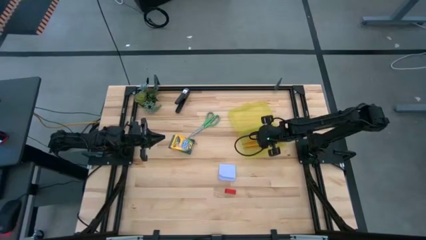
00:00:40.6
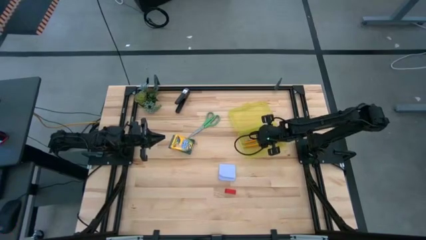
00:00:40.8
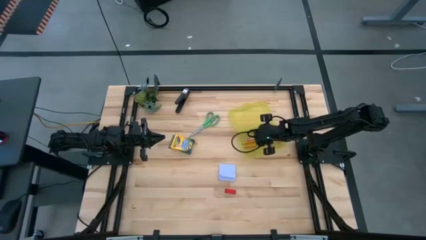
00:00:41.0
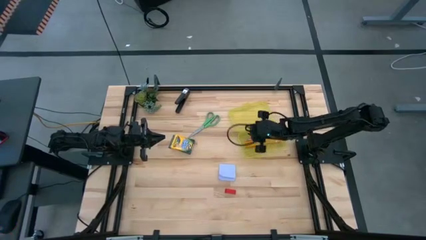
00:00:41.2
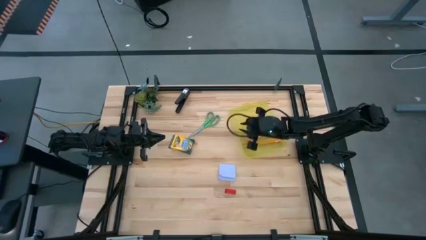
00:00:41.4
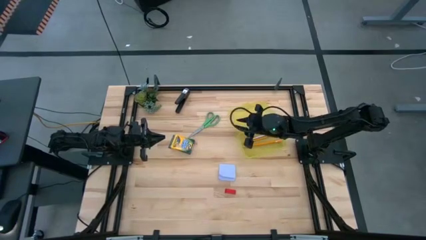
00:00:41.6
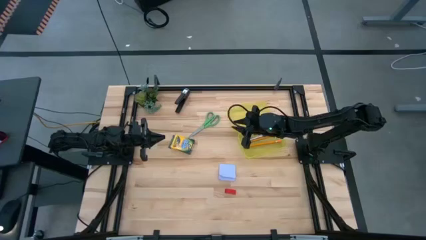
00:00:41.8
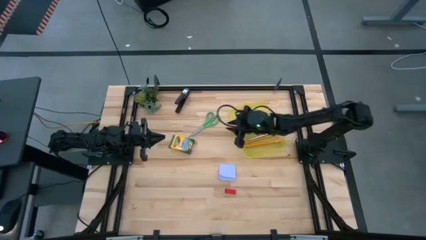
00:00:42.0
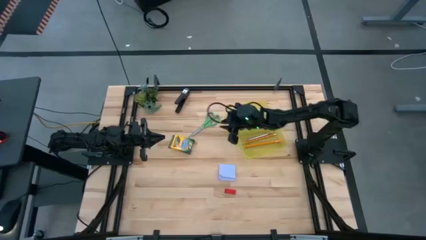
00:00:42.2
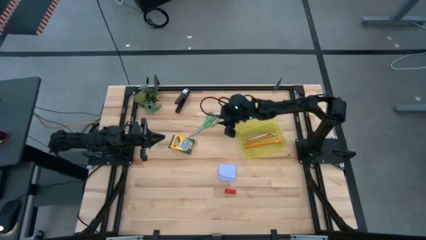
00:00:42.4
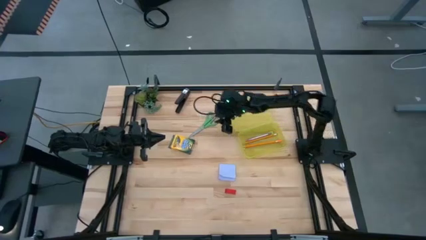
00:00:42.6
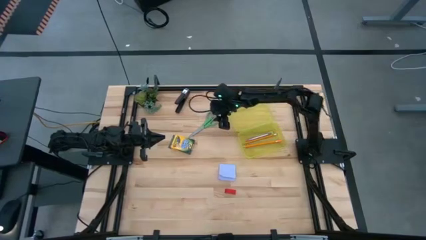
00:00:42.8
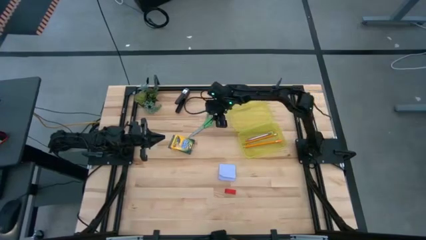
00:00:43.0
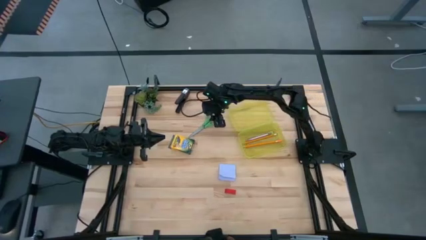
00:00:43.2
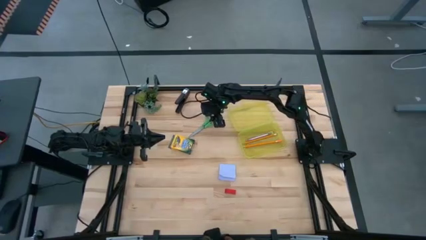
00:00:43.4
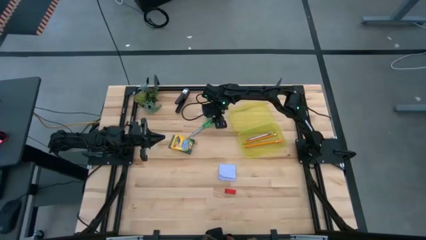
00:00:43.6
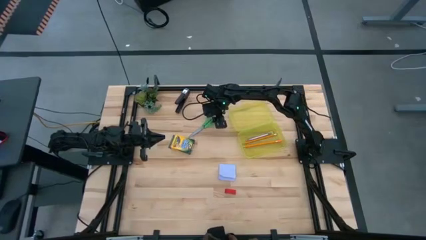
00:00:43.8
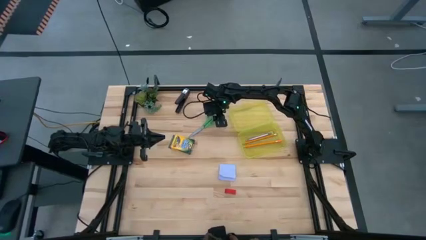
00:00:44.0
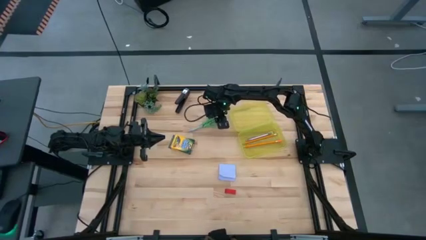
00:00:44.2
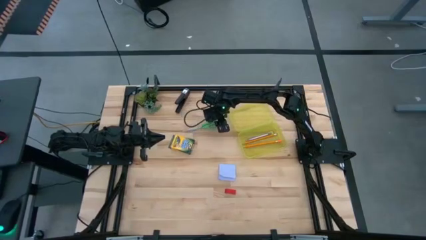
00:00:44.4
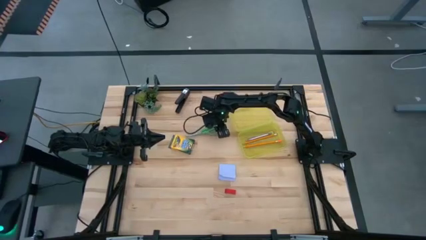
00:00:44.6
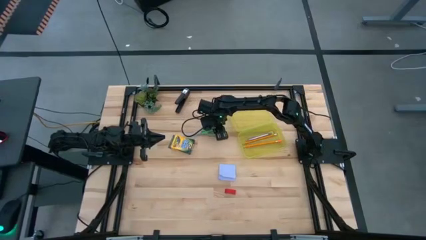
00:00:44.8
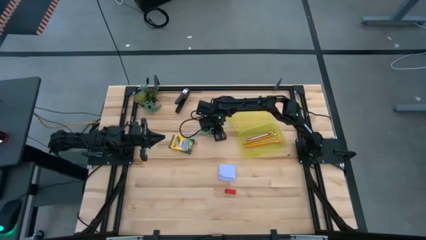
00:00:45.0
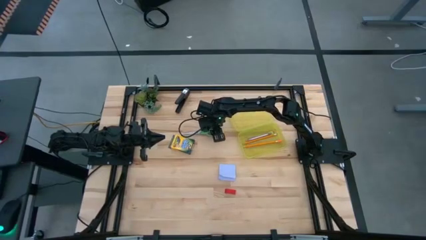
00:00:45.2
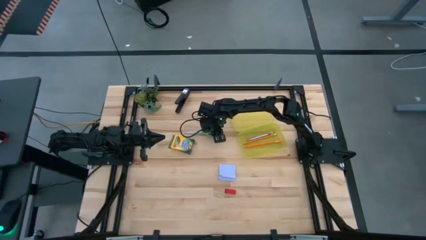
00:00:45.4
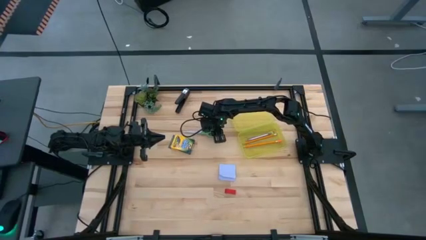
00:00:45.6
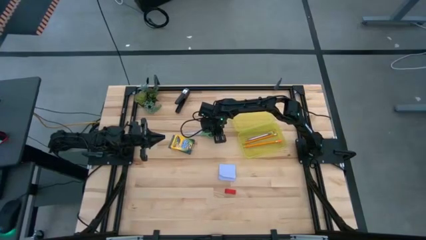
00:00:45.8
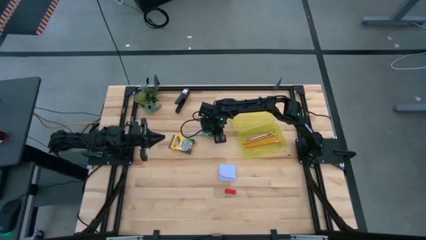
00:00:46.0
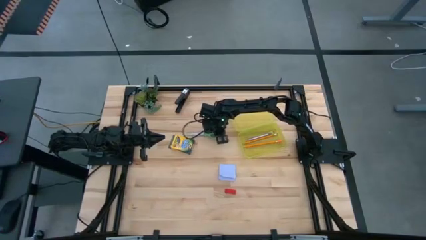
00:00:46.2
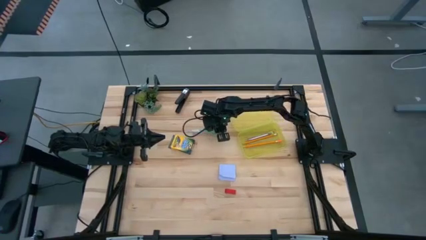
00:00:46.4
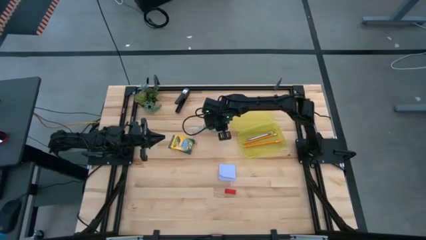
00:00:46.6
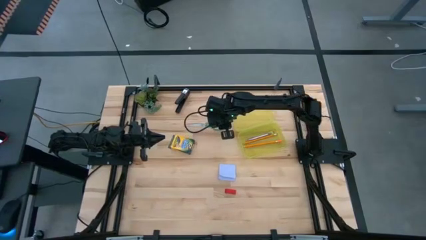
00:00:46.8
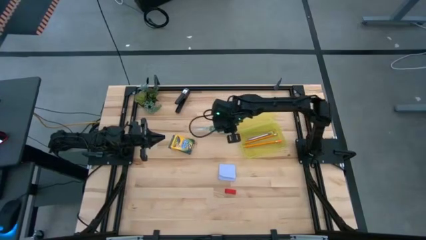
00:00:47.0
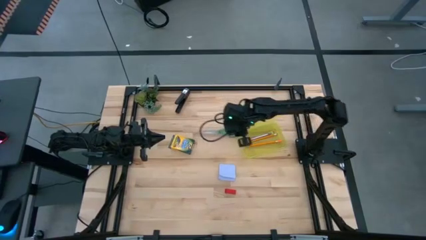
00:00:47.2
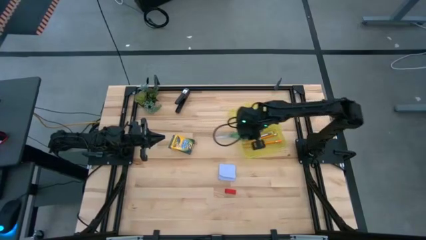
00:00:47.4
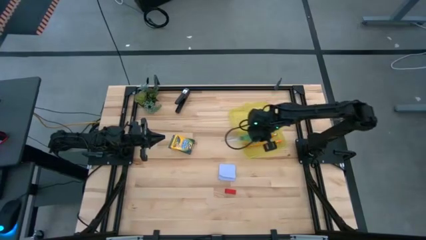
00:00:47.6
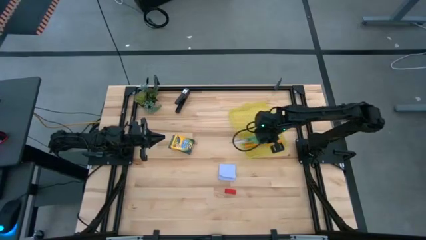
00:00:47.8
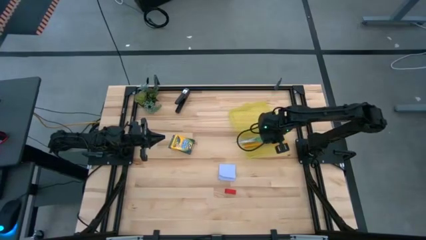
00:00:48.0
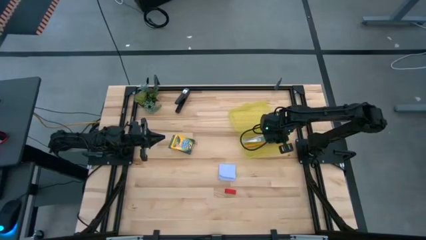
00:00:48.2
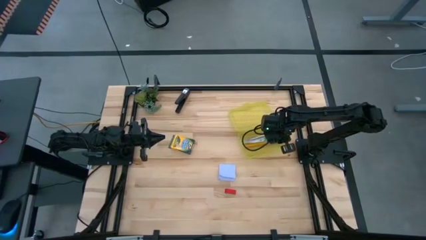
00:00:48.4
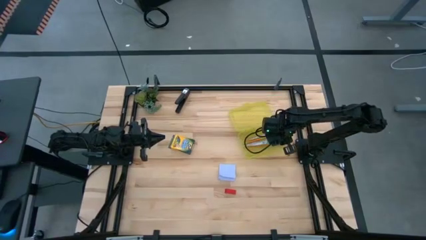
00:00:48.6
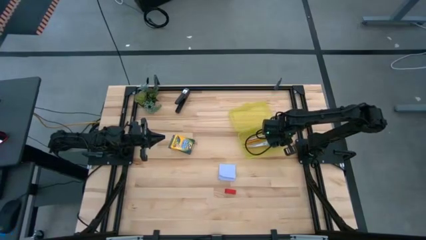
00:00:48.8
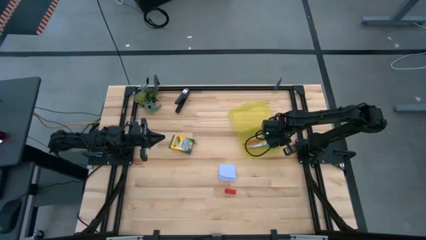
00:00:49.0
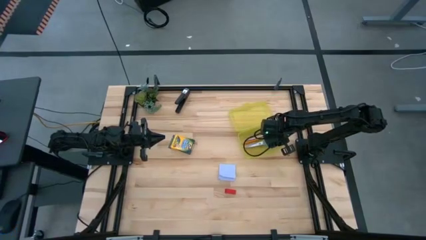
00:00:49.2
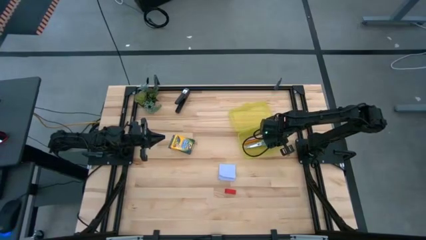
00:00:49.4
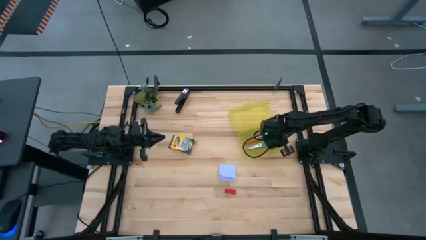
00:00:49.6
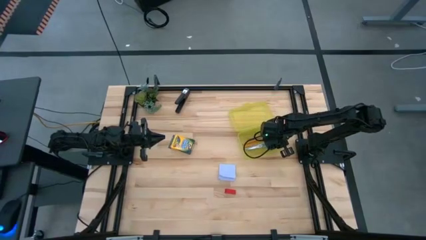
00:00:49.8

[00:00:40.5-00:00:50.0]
Task: Pack school essentials
Put the green scissors into the yellow supply box

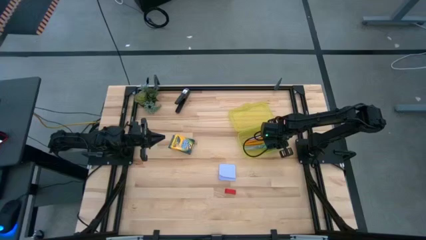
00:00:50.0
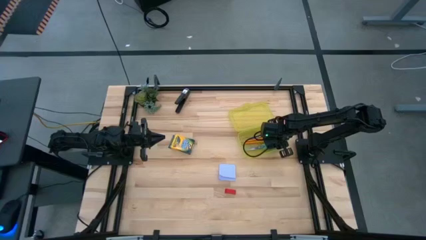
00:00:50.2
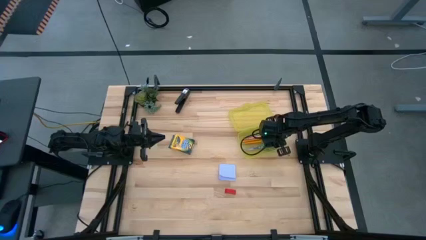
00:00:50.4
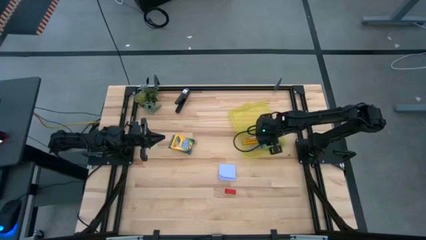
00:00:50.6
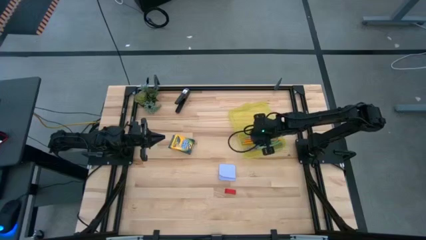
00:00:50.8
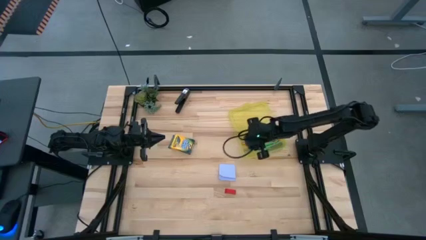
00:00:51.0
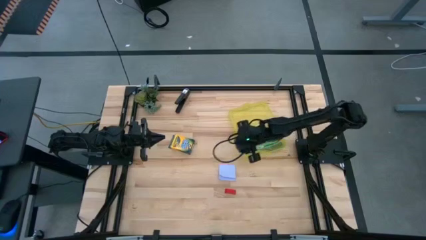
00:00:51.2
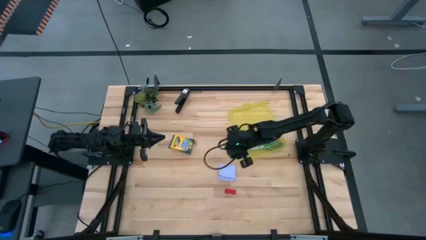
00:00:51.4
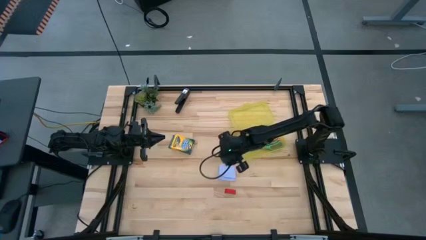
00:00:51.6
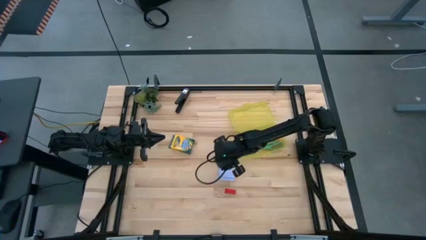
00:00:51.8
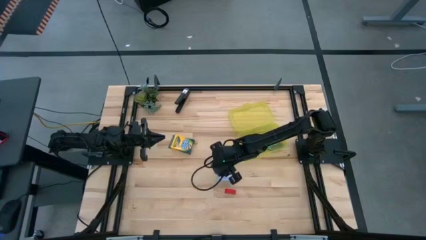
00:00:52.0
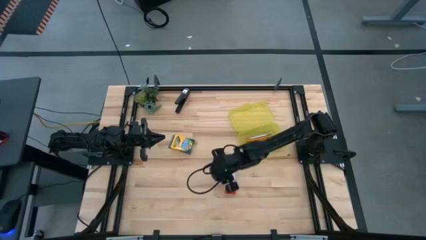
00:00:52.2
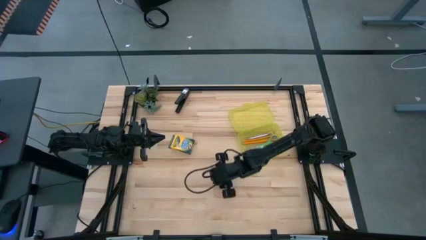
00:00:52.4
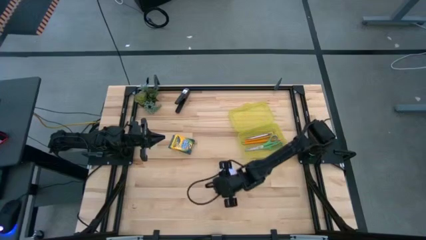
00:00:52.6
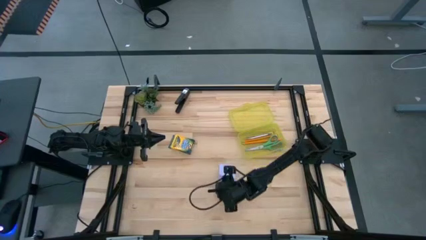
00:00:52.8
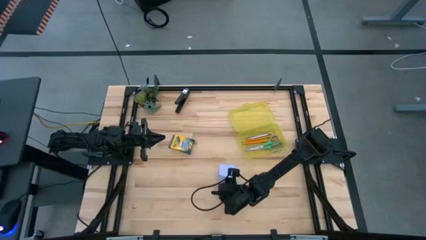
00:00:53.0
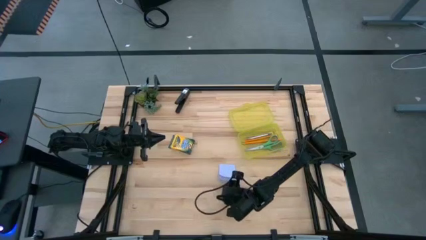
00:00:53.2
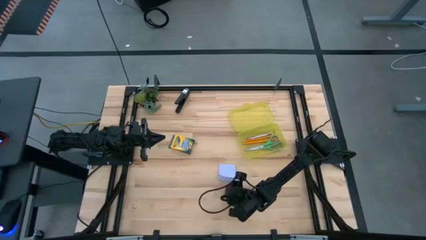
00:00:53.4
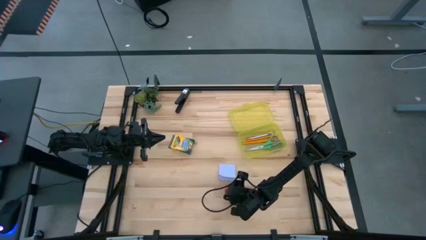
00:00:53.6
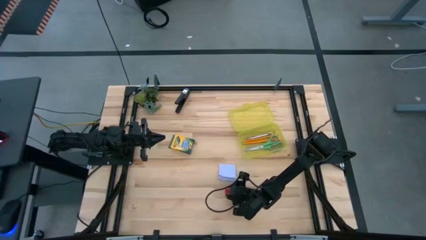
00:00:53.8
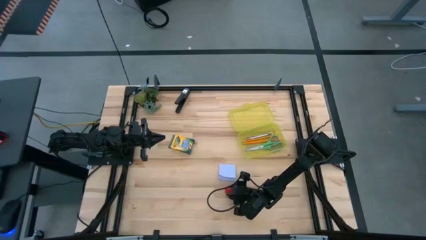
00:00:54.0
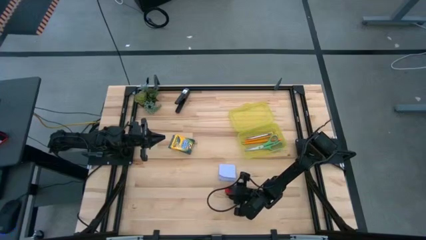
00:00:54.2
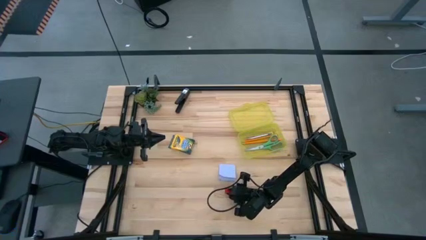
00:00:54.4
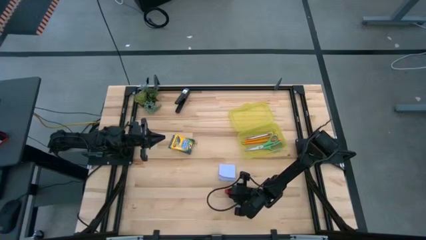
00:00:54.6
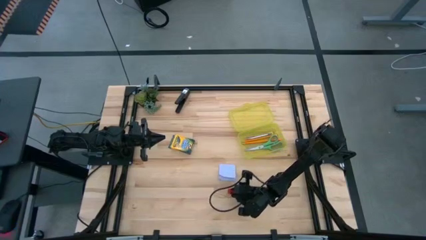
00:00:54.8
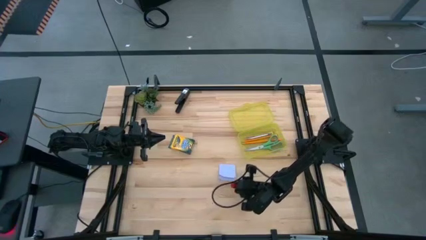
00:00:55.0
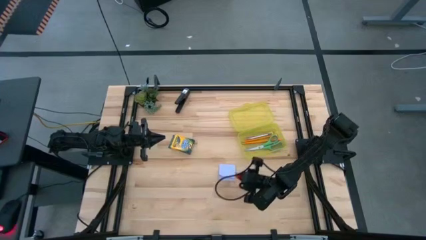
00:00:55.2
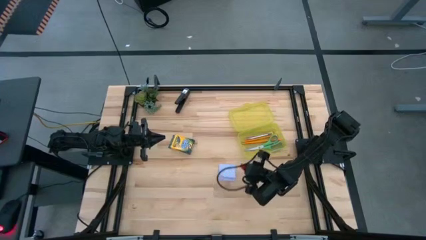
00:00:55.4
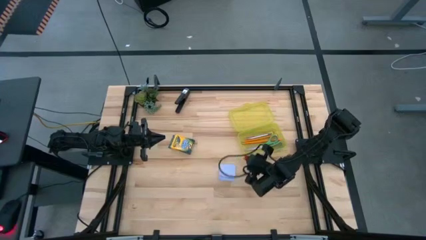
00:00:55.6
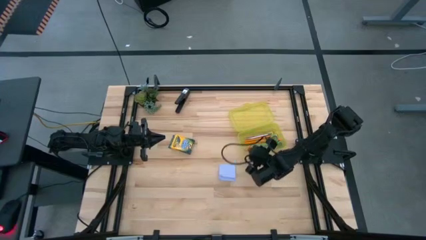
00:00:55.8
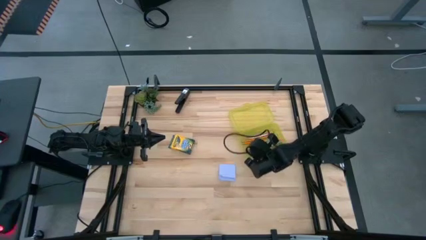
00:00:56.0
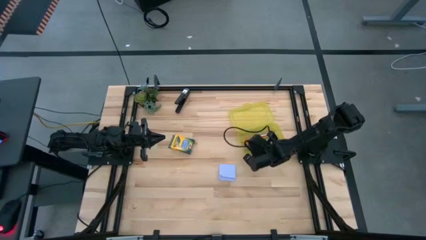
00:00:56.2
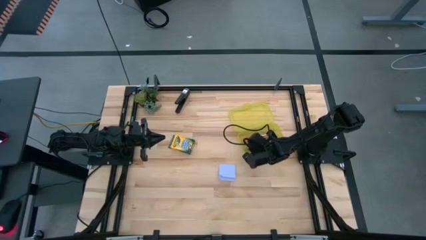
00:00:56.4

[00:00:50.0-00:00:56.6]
Put the red eraser into the yellow supply box

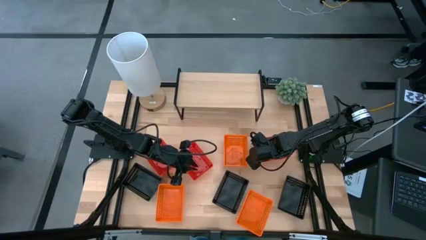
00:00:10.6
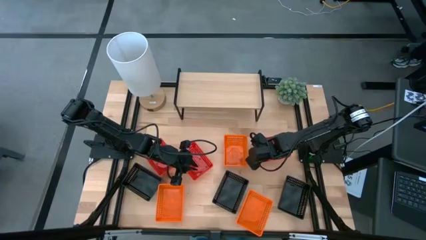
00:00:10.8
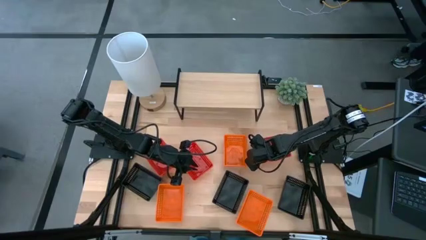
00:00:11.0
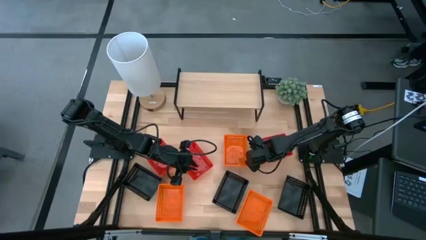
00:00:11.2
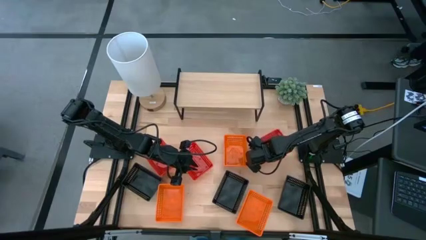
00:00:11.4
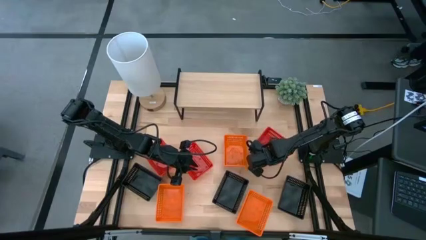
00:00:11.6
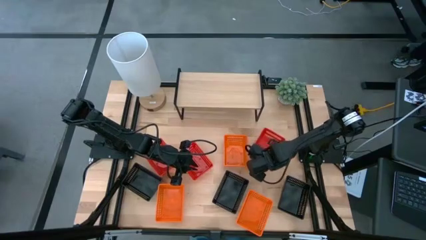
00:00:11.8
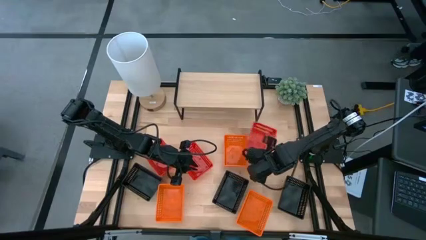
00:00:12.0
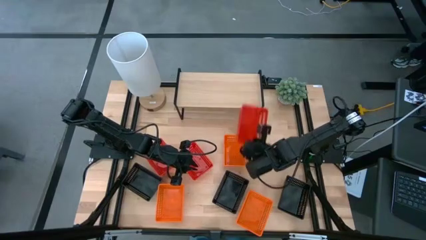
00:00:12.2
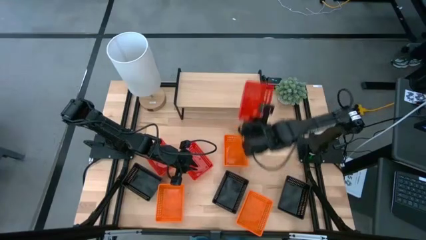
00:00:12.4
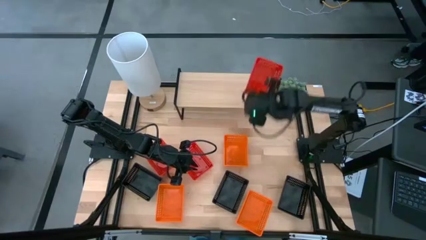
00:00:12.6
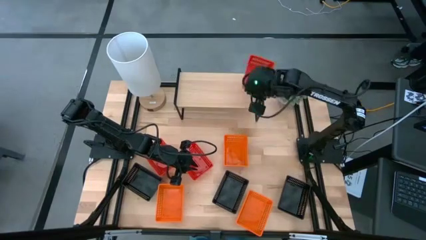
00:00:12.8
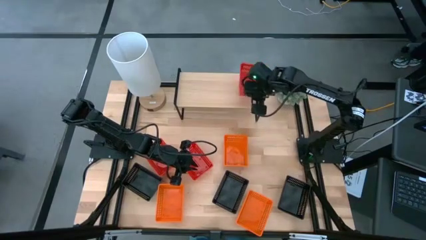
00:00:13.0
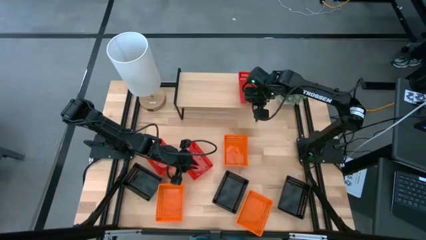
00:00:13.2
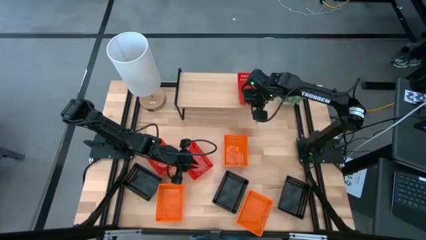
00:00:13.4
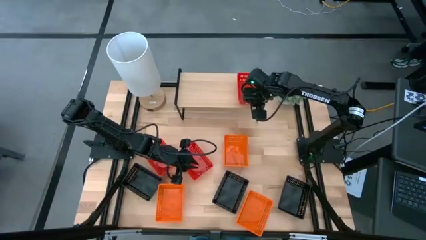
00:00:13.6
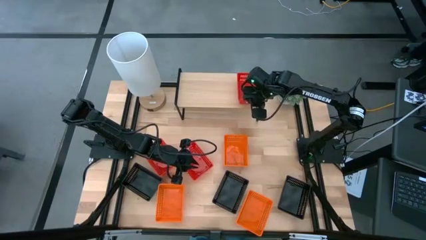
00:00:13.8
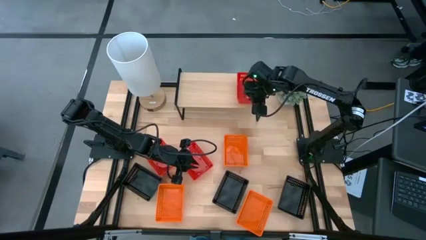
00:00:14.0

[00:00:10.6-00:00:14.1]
Task: Stack baskets on shelf by color
Put the right red basket on the shelf
